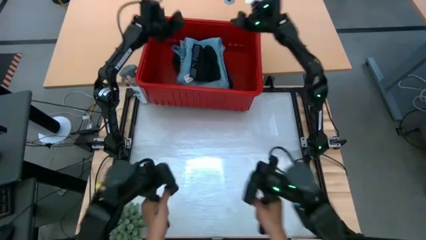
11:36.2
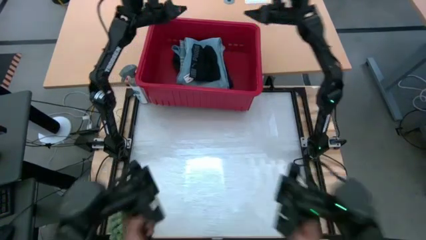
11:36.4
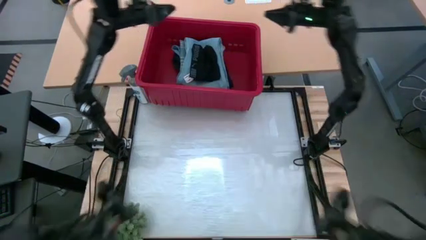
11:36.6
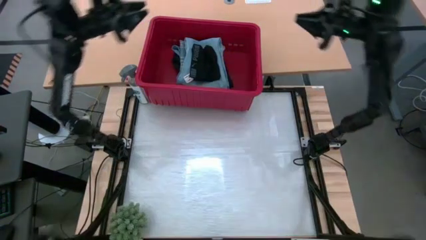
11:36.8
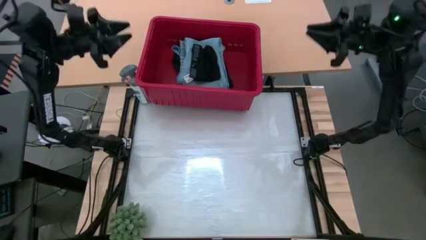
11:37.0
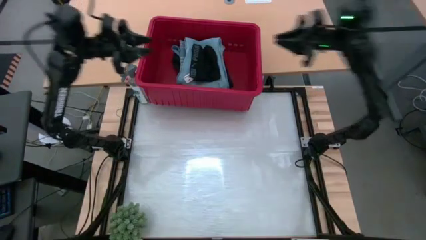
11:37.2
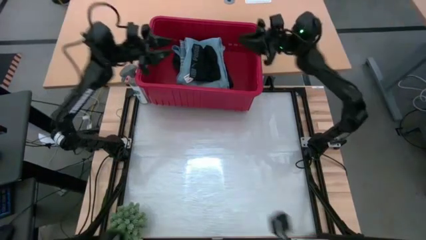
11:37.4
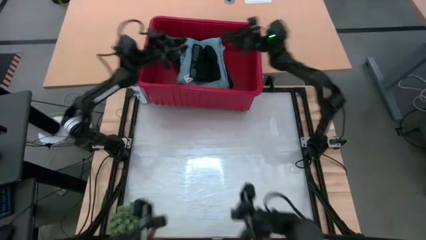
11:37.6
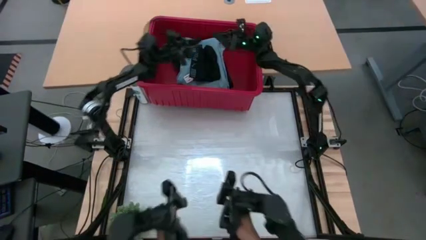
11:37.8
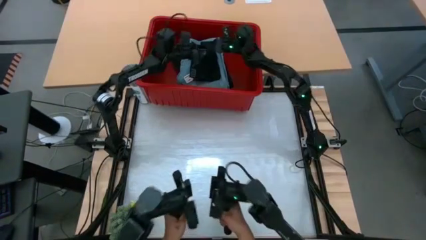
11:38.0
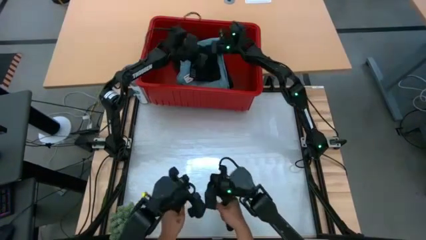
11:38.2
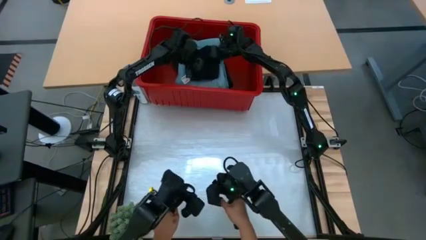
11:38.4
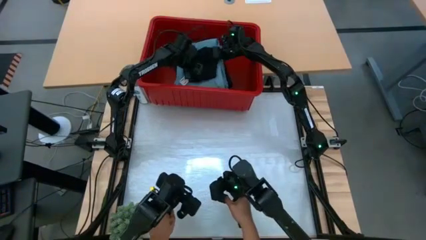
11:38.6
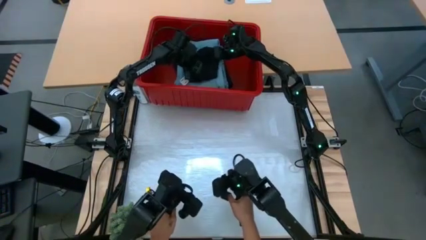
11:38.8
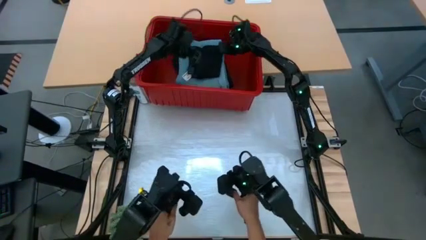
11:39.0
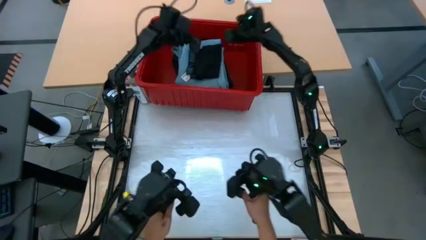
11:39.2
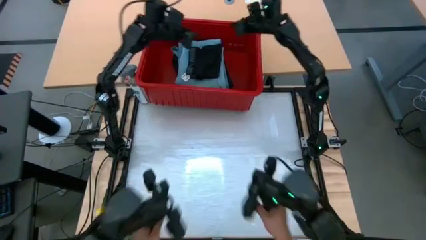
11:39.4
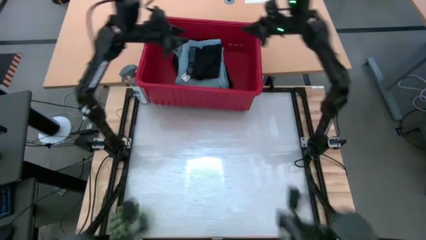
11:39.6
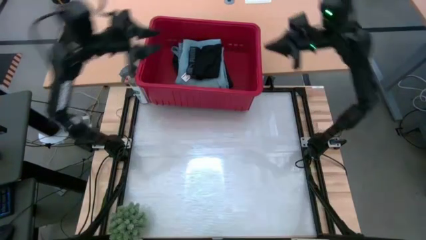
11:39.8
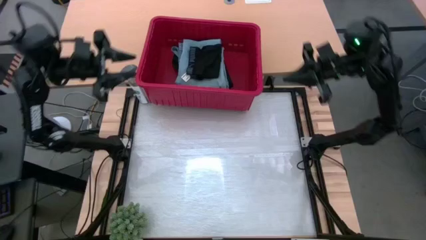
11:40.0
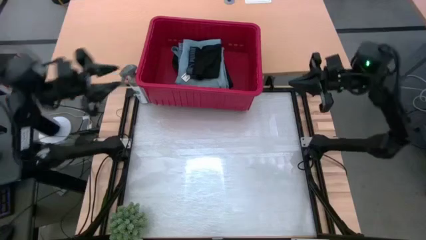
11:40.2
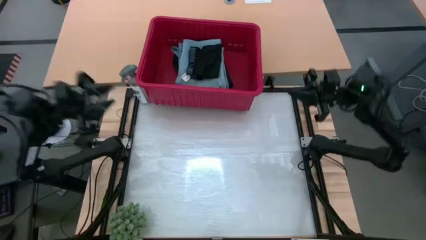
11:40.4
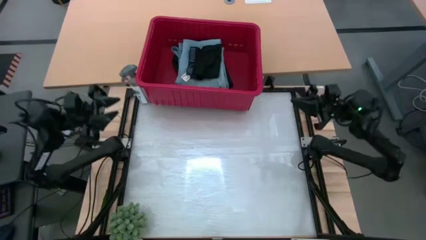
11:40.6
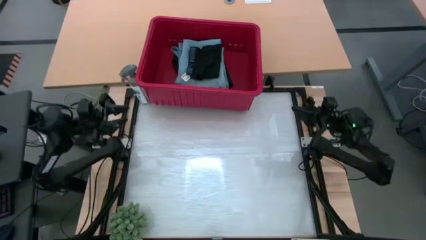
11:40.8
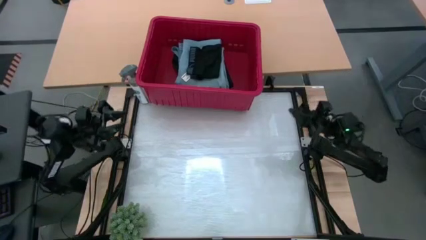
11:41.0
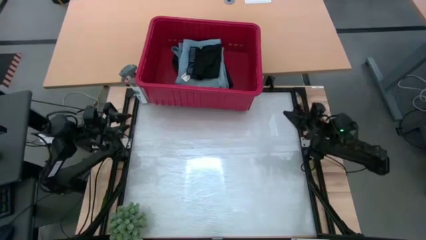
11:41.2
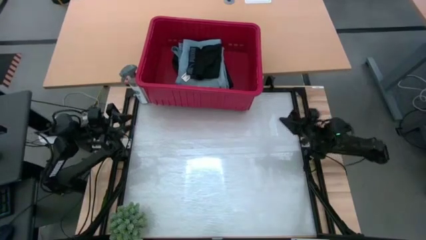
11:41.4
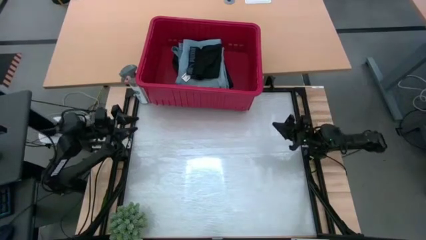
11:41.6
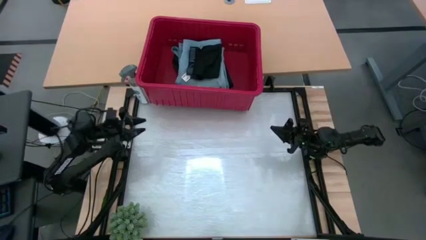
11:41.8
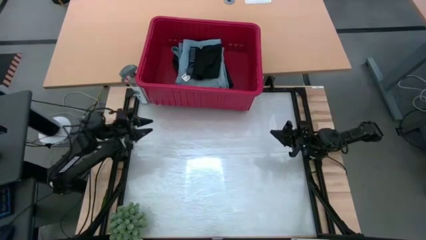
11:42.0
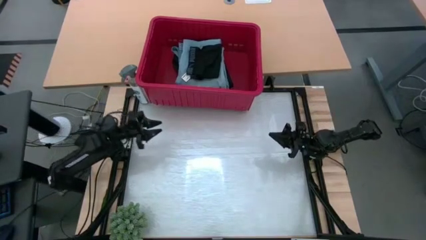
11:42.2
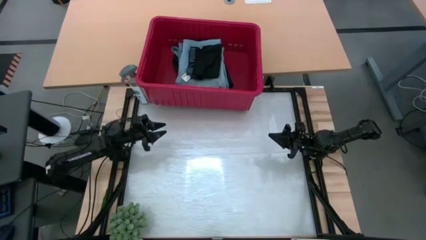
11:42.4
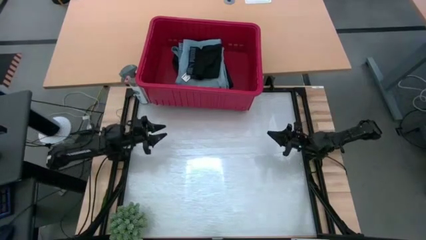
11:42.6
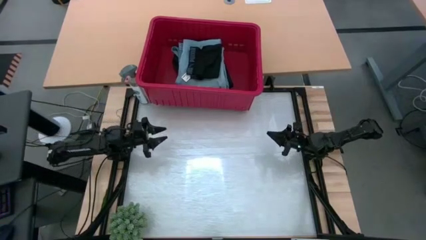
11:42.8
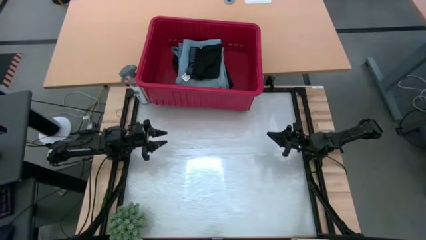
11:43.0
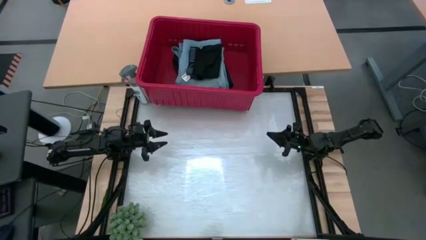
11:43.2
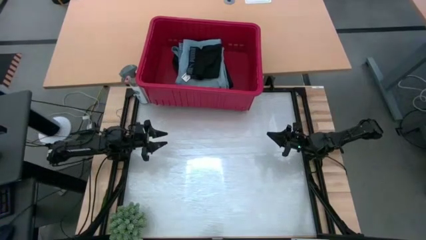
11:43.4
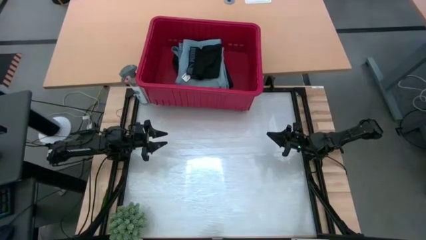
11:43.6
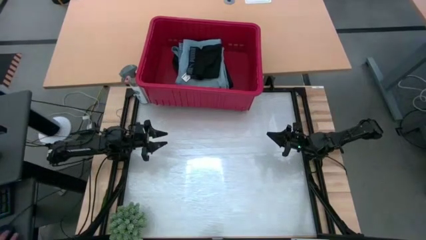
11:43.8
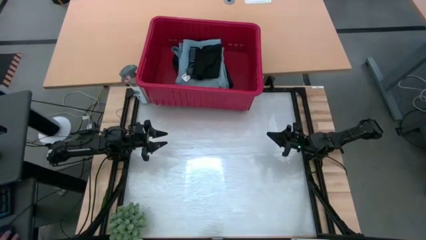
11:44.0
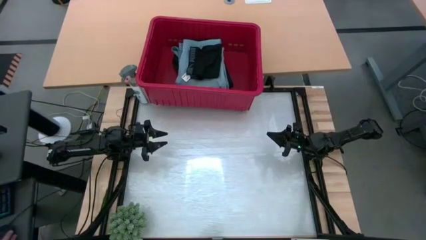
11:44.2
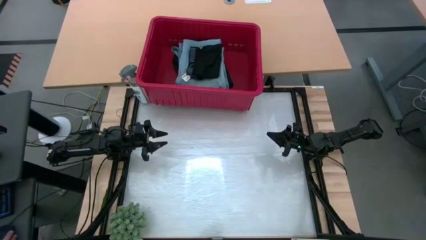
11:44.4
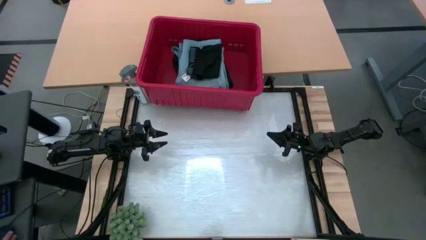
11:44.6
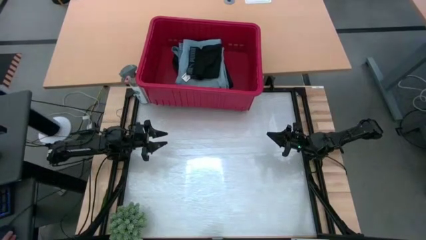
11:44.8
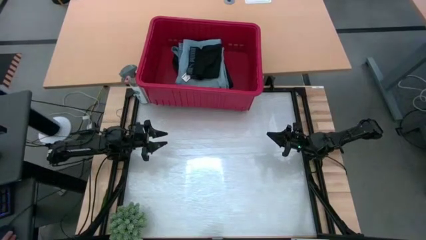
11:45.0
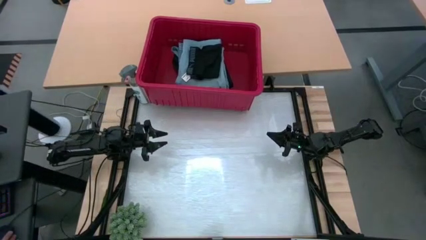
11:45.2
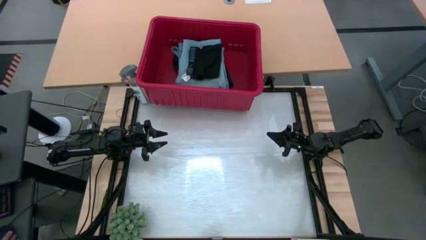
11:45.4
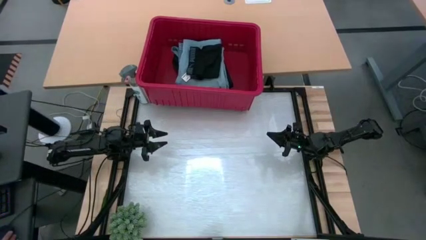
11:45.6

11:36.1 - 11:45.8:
Task: Fold Laundry from Bin
Return to Home Position
